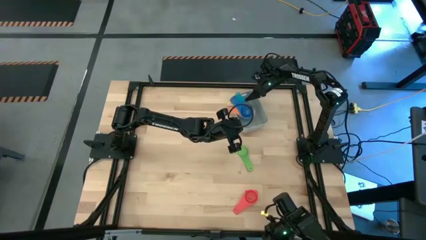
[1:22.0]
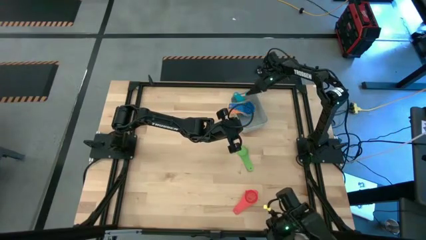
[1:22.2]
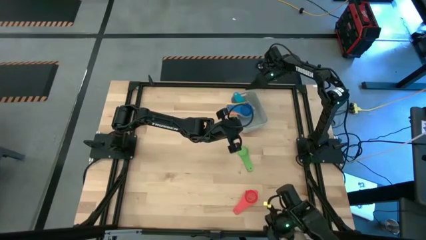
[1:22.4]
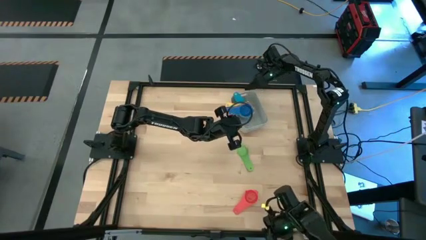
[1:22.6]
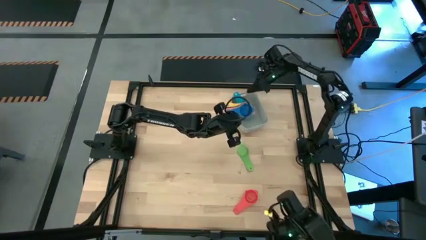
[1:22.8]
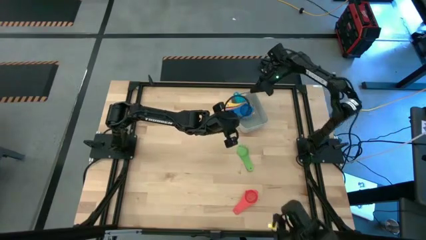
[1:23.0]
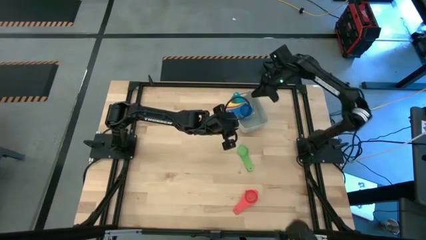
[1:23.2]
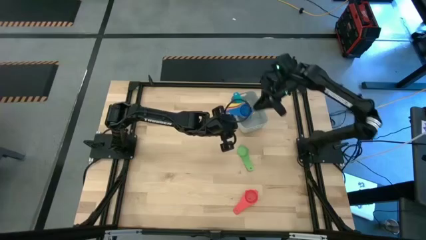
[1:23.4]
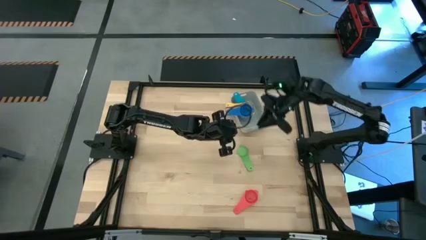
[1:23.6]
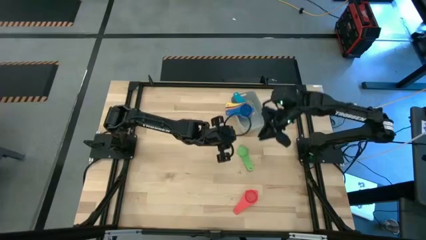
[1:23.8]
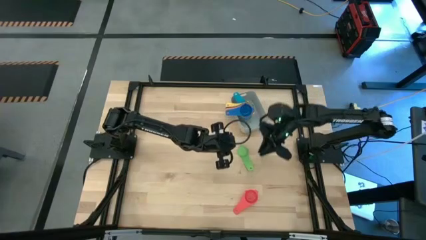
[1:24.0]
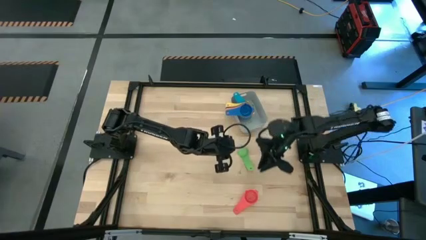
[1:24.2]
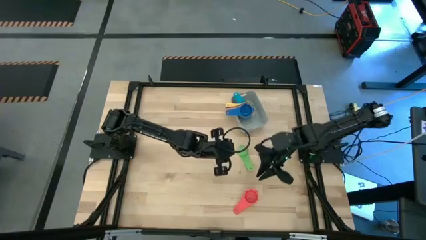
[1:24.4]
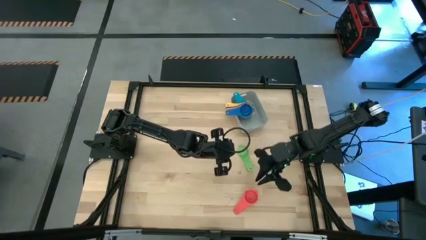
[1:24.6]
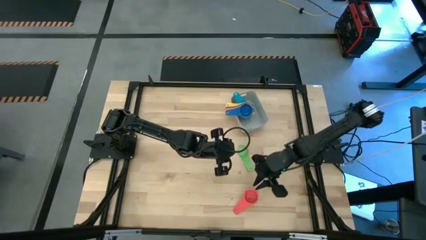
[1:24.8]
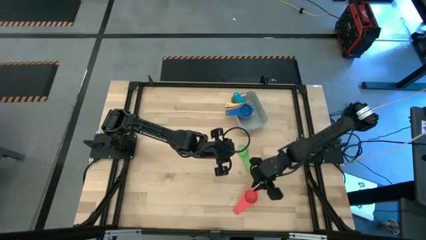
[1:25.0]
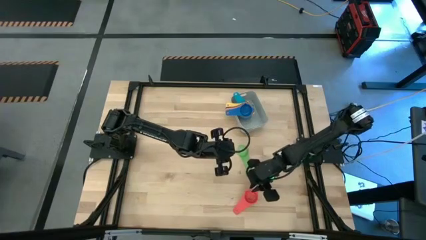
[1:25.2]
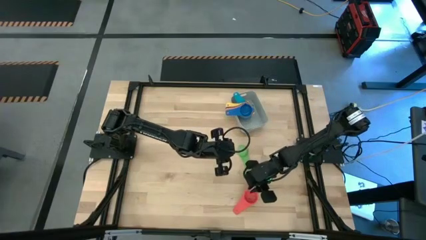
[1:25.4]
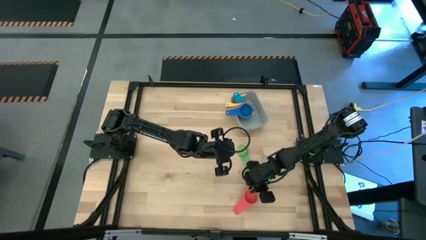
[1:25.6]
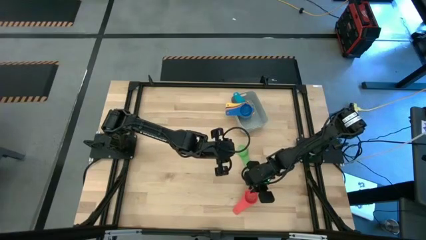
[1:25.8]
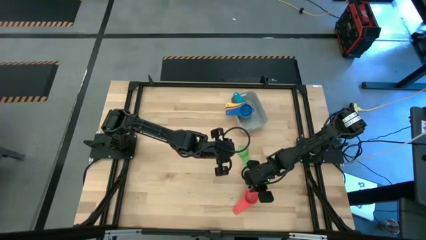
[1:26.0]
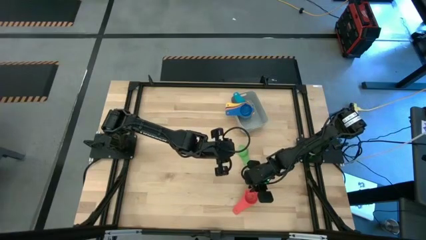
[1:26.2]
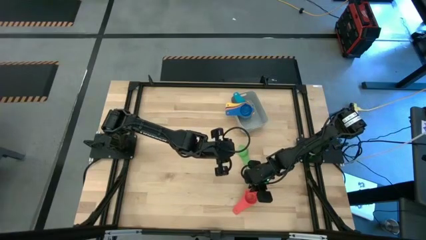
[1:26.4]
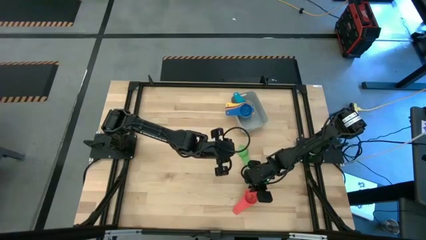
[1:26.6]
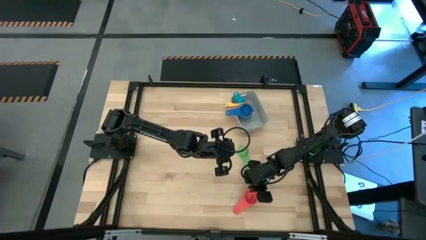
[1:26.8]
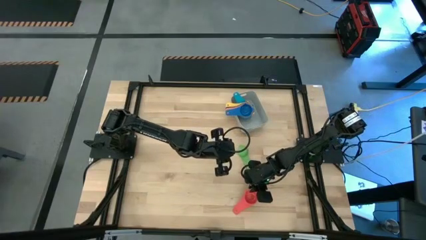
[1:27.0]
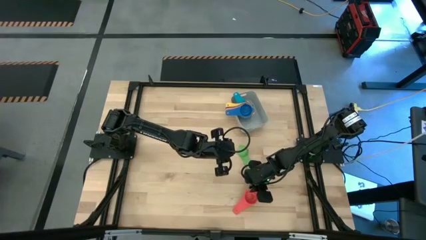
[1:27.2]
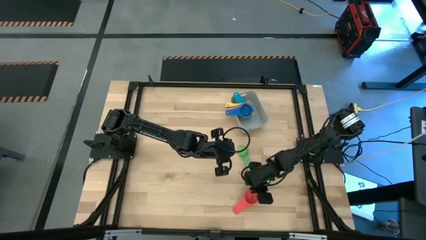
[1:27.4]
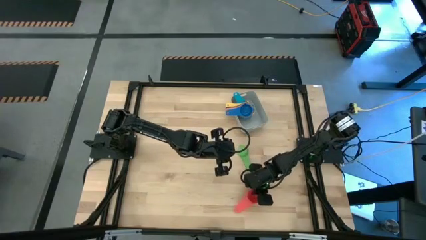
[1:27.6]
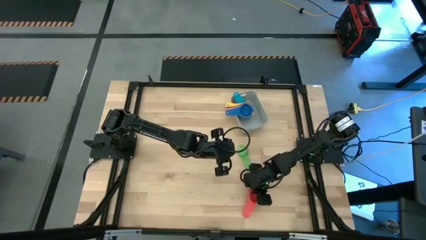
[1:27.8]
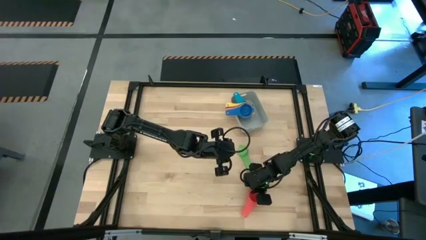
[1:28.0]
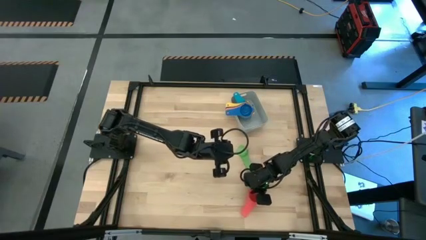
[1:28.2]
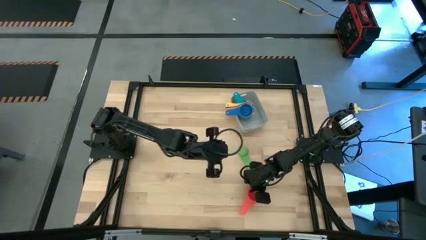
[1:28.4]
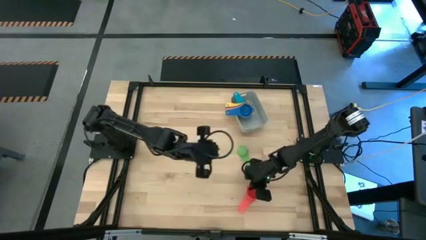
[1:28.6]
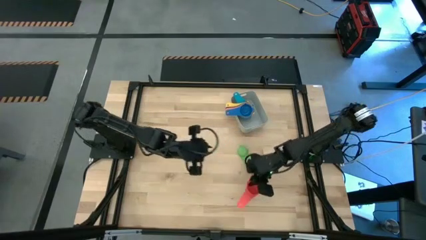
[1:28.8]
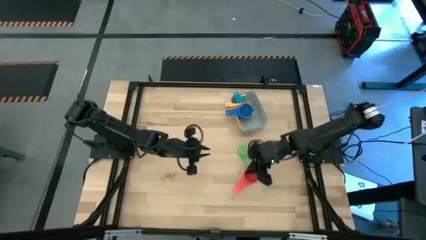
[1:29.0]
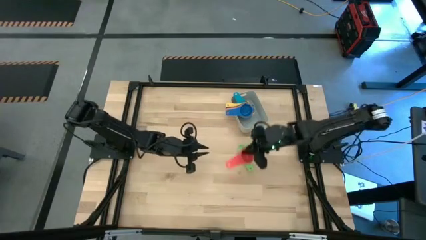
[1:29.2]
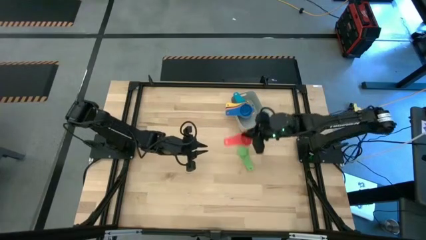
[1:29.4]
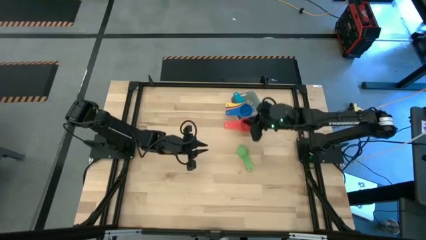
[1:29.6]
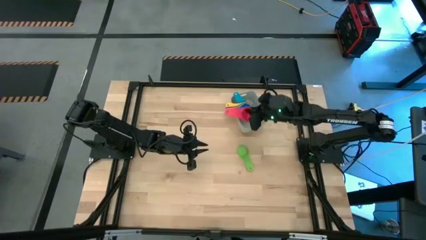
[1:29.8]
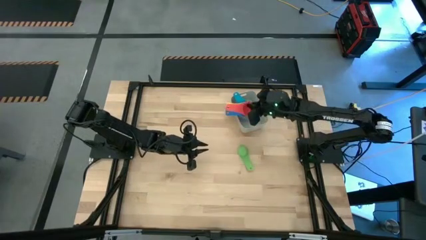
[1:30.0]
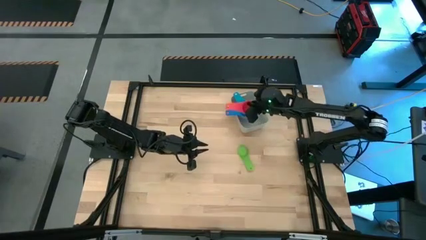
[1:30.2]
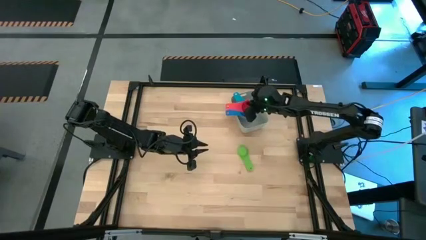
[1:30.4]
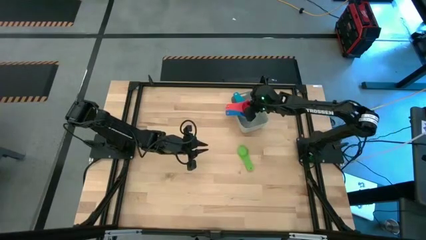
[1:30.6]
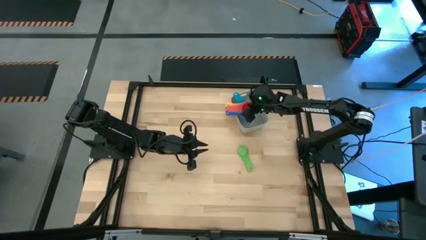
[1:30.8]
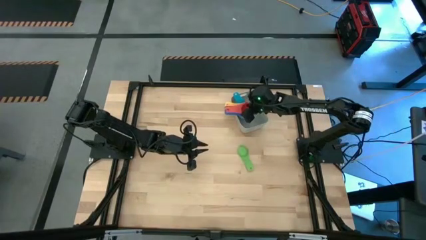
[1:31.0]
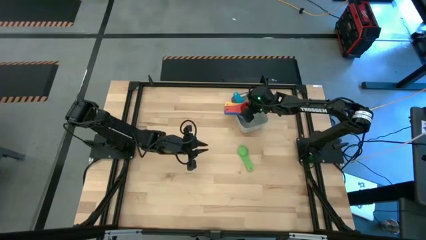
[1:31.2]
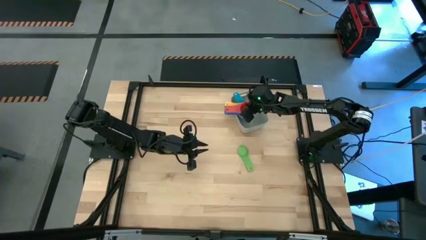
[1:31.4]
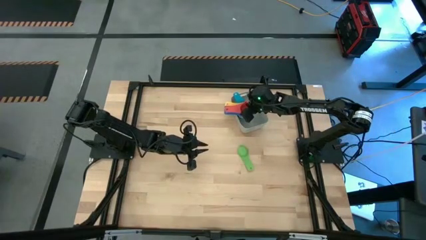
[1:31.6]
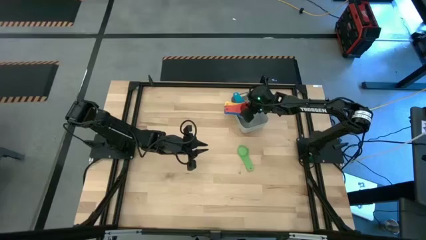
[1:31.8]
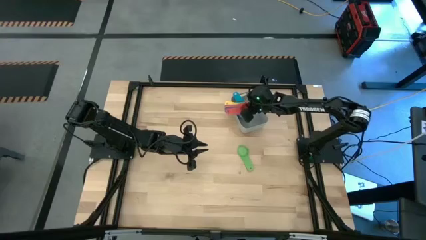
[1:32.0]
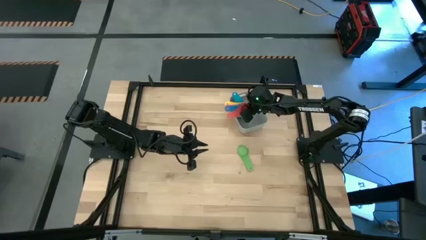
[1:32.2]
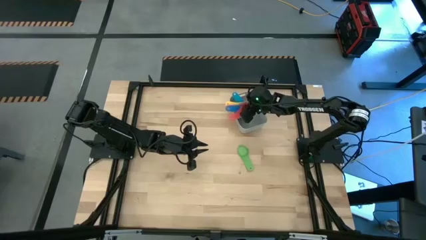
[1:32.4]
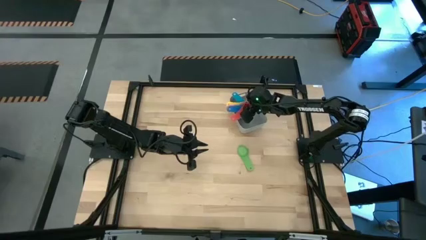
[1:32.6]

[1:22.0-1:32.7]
Task: Nest measuring cups in basket
Stack the red measuring cup on top of the blue measuring cup into the gray bin
